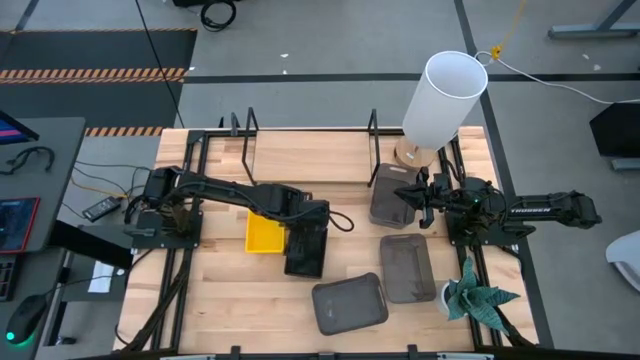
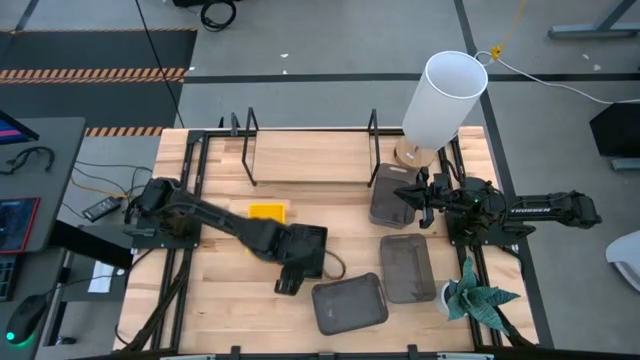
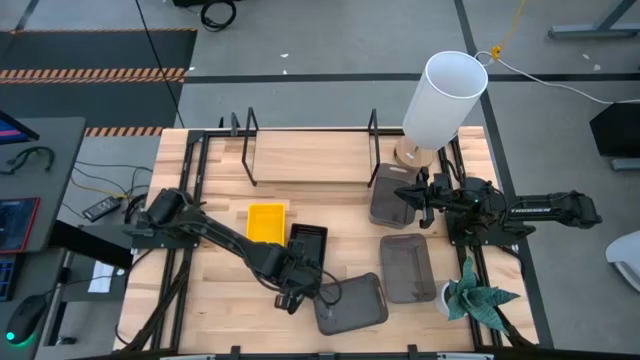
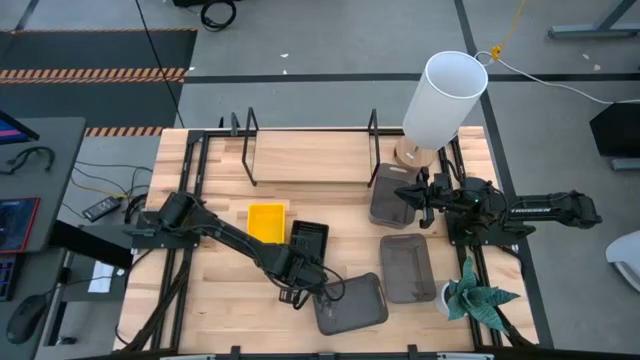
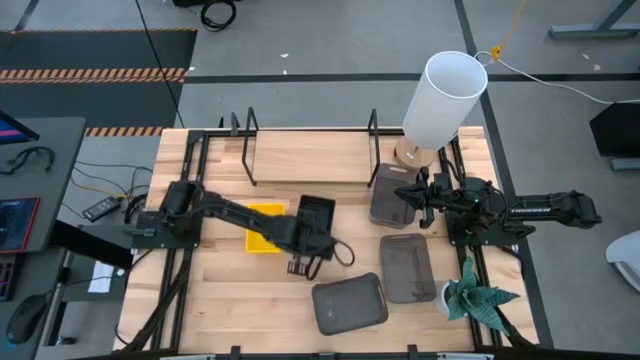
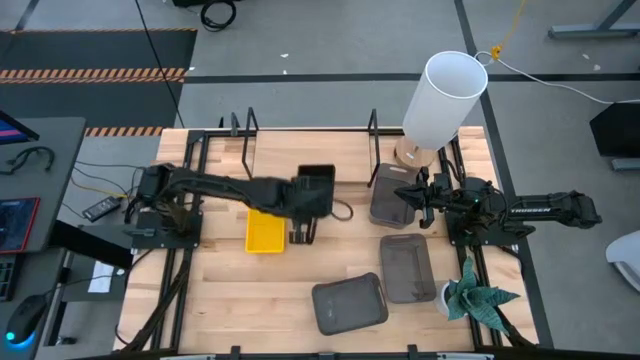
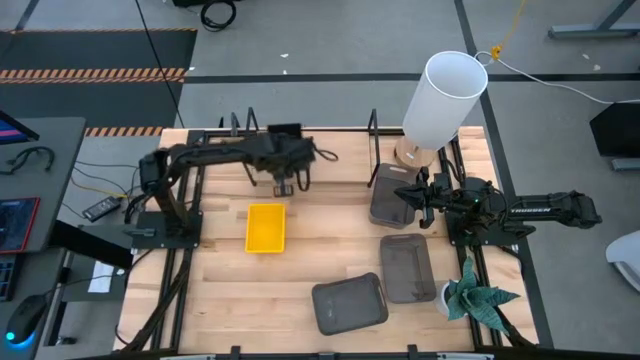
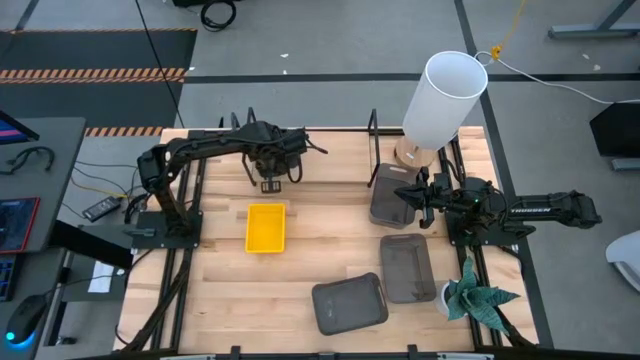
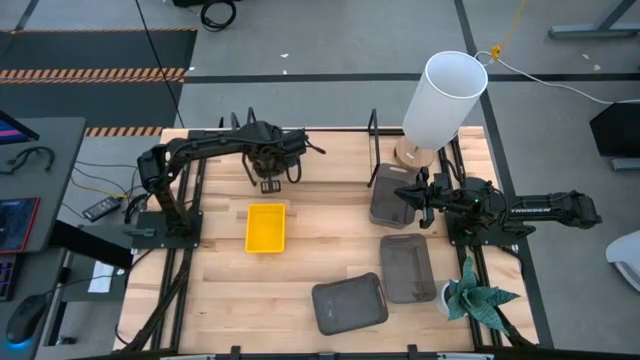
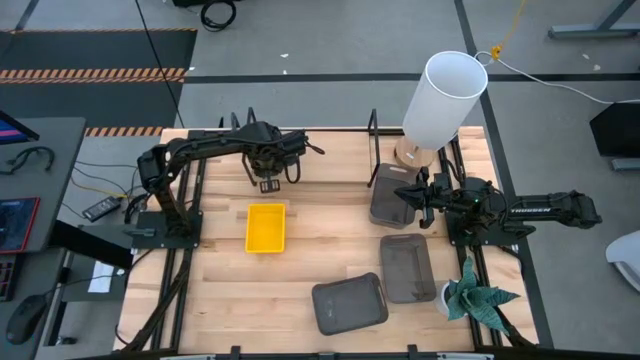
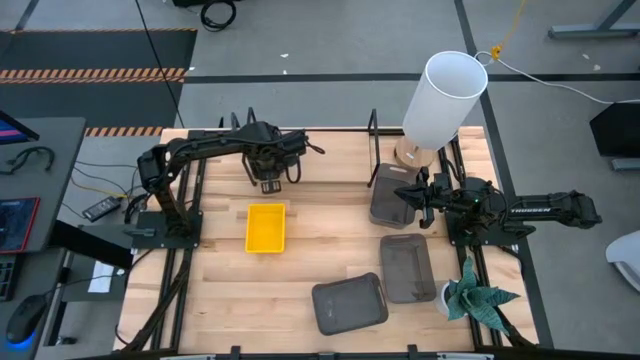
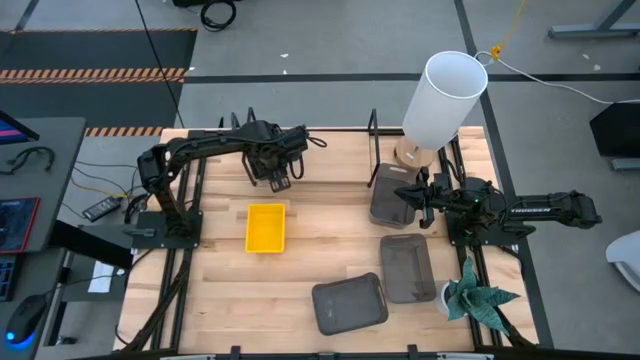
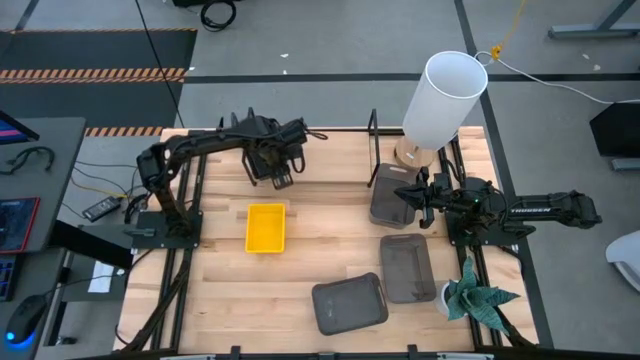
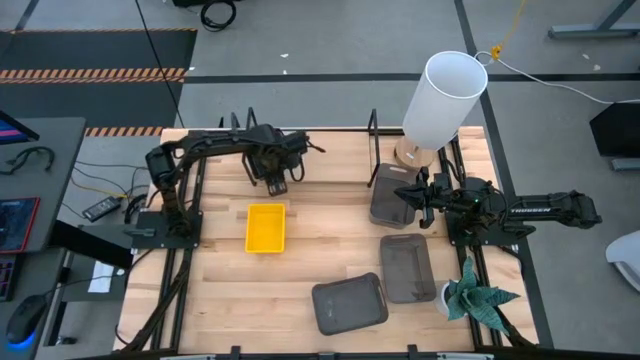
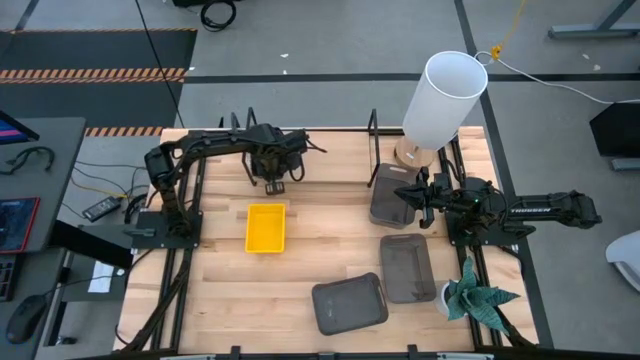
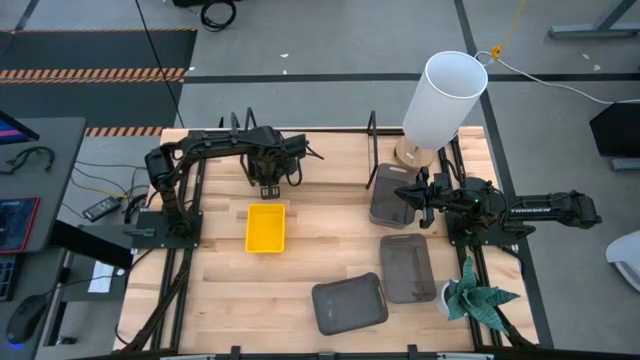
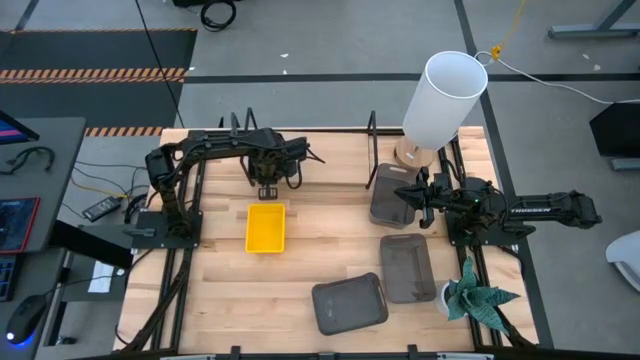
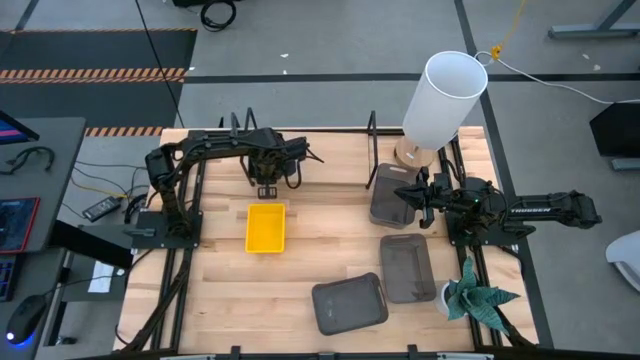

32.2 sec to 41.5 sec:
Task: Stack baskets on shelf by color
Put the stacked black bin on the shelf

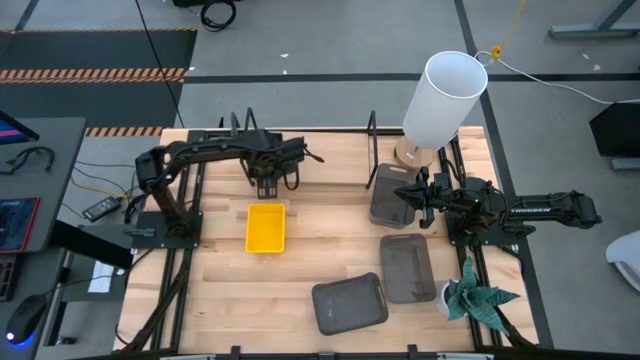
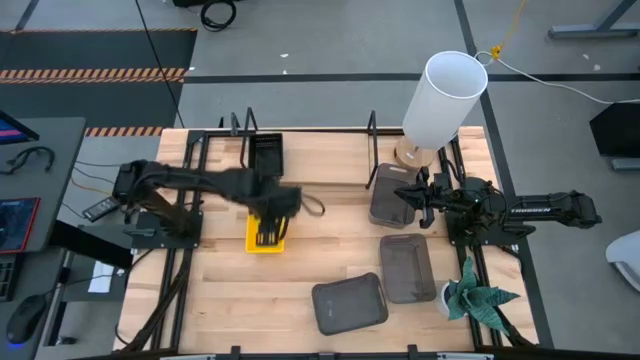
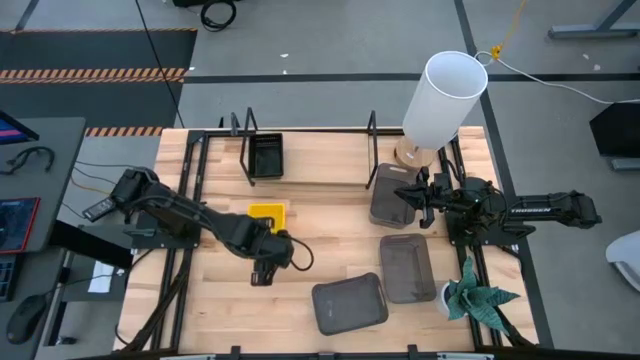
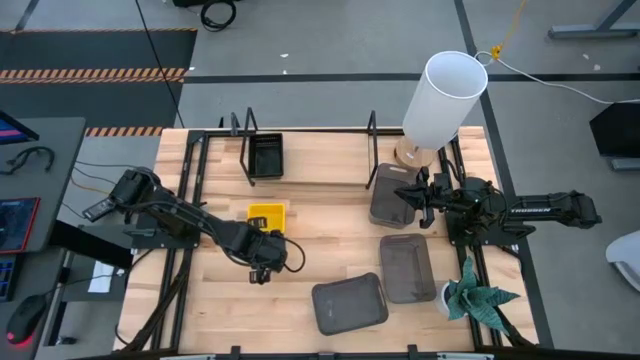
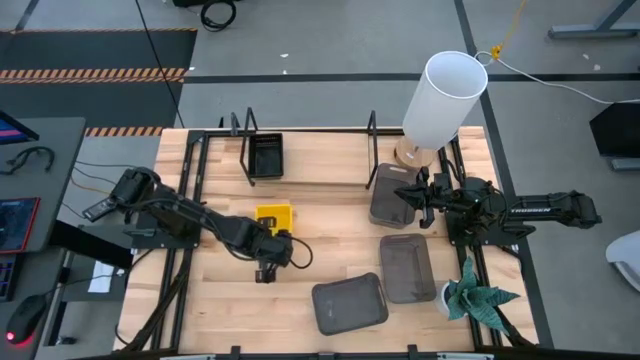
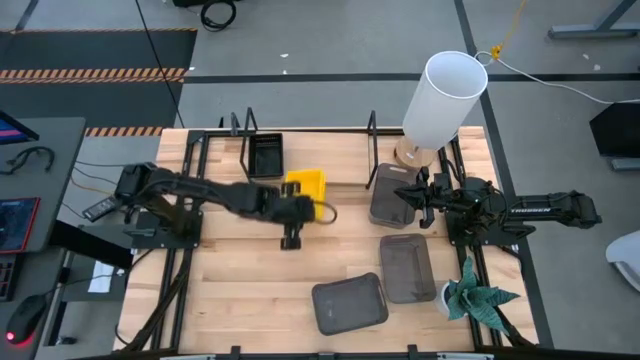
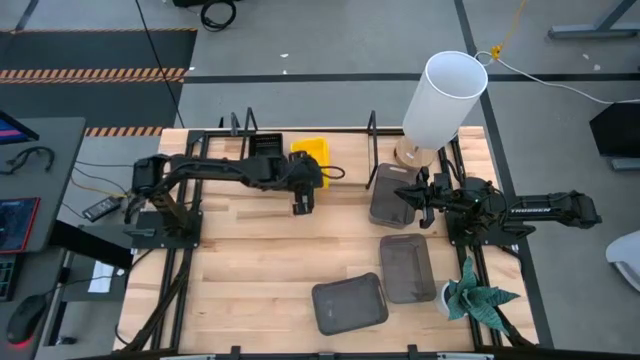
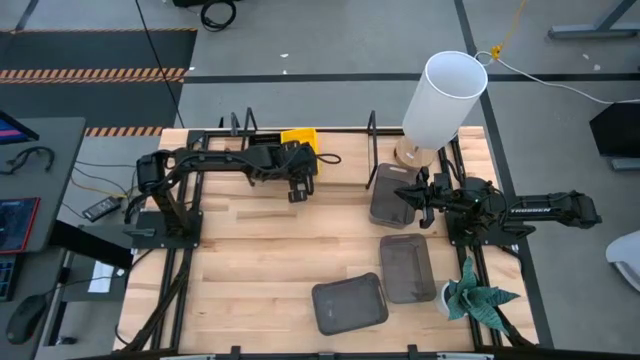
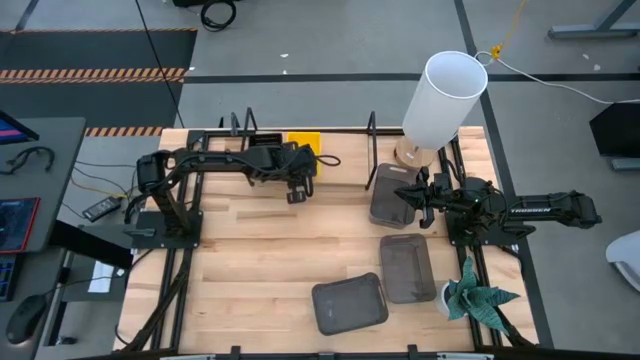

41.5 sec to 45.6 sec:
Put the stacked yellow bin on the shelf

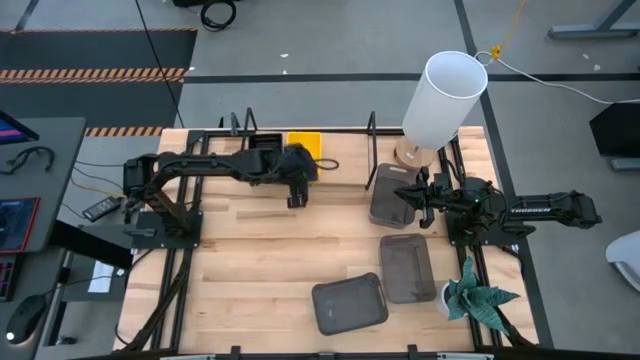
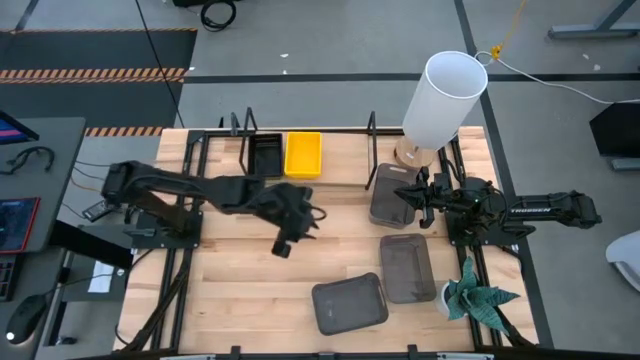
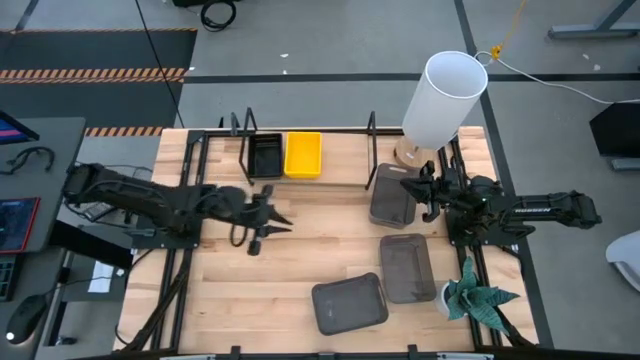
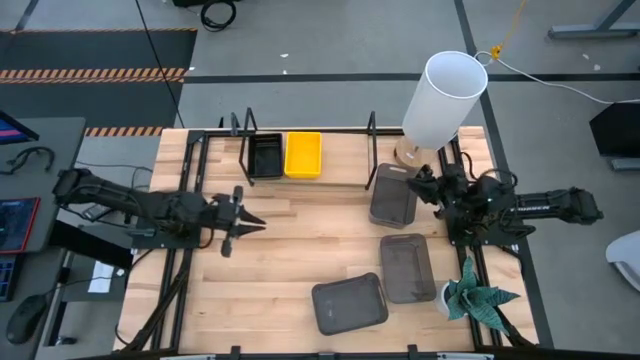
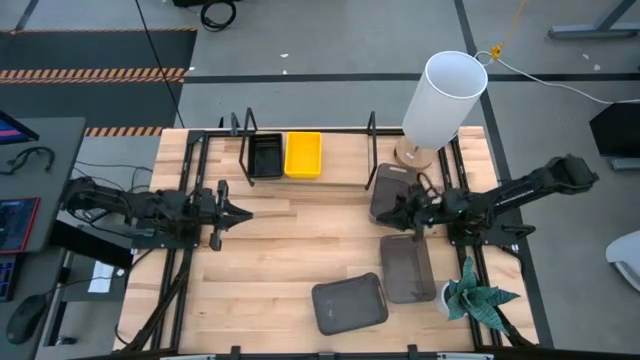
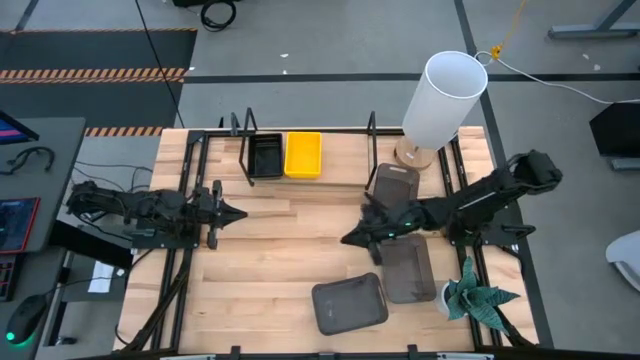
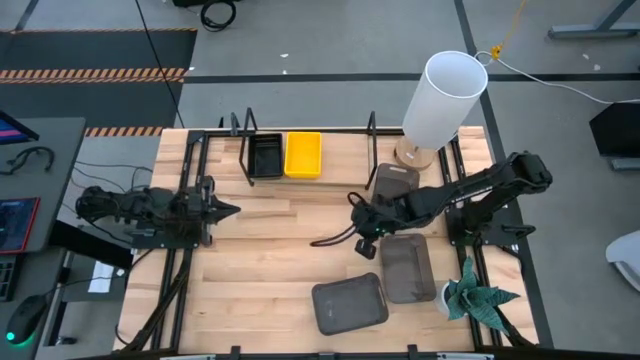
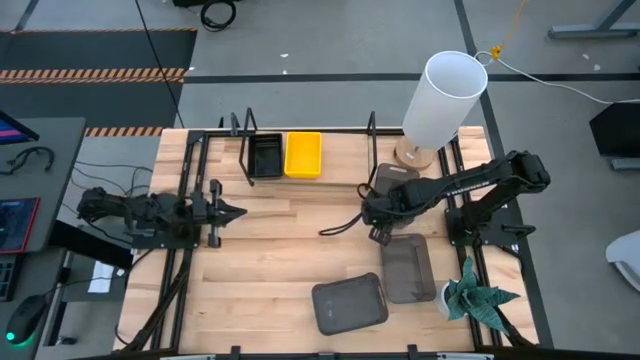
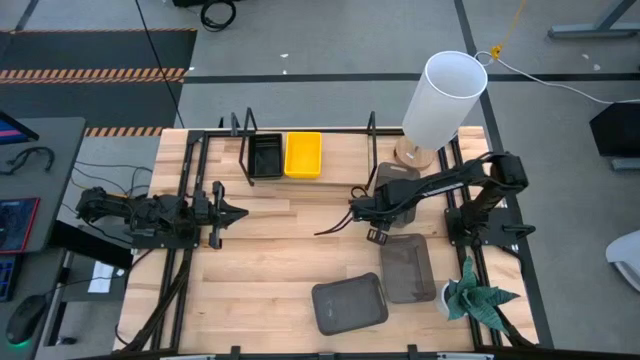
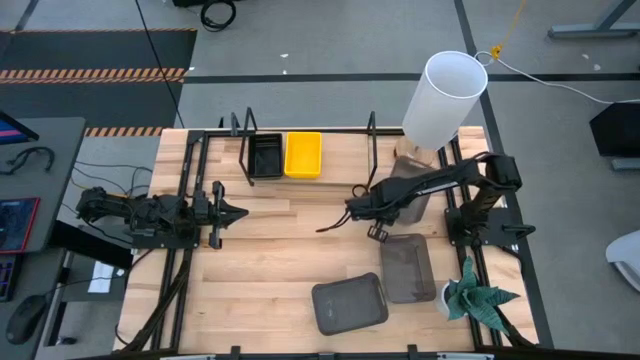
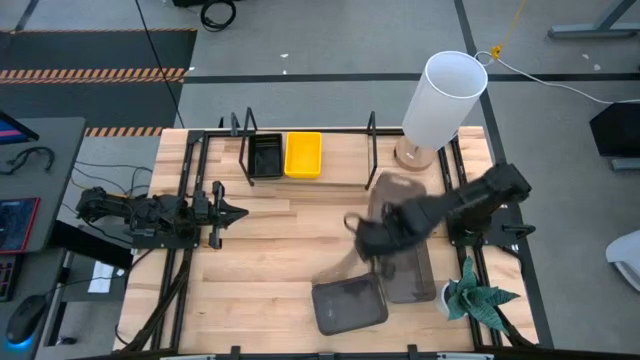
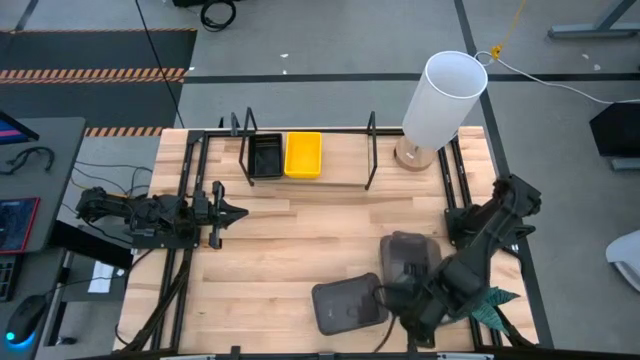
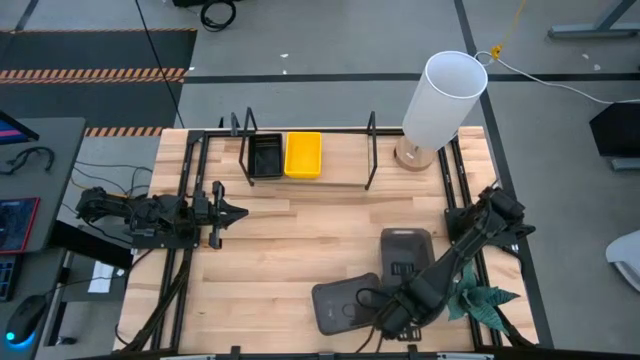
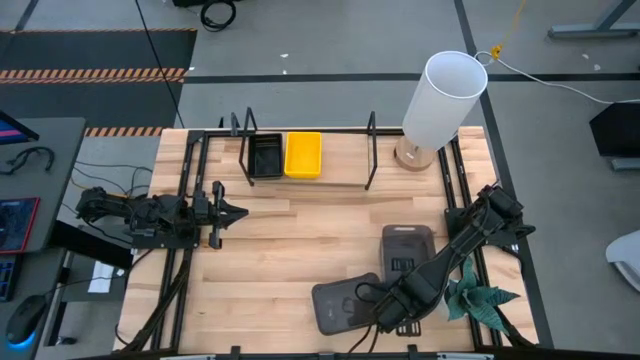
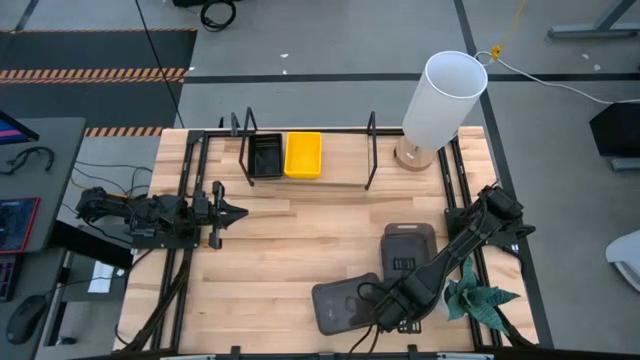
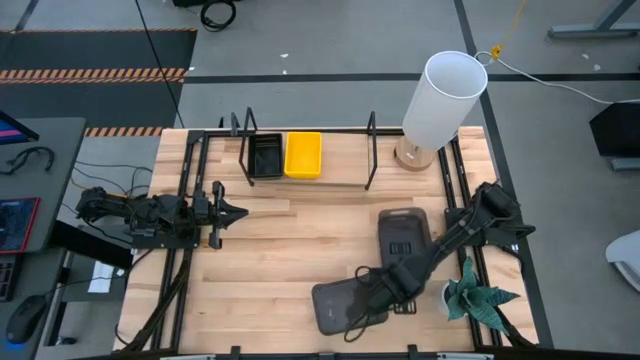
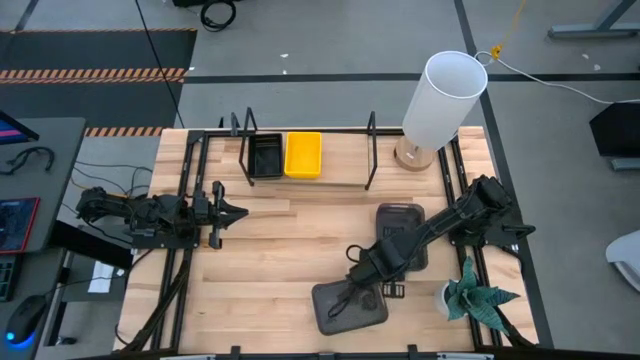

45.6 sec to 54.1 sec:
Stack the top right gray transparent bin on the middle gray transparent bin
